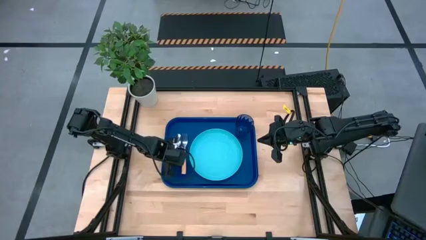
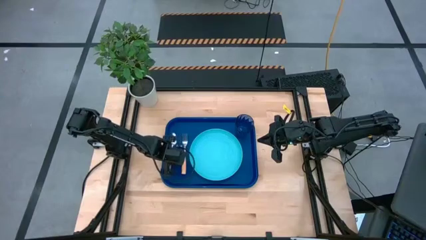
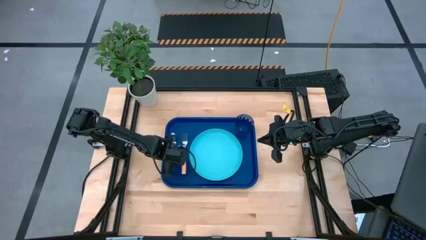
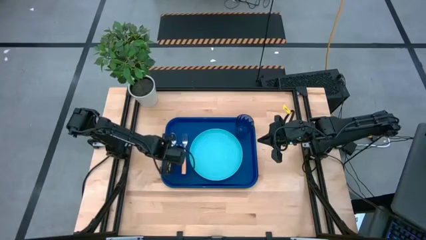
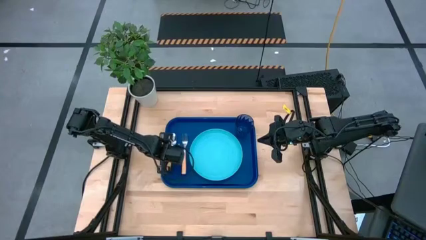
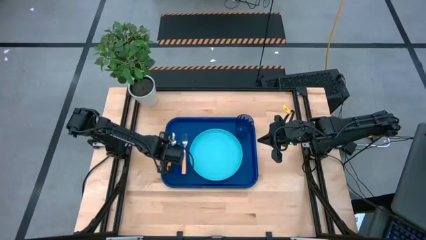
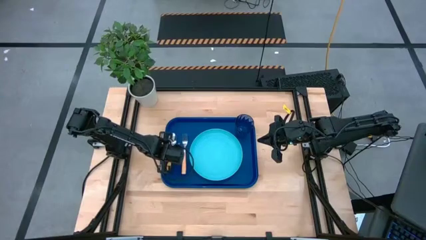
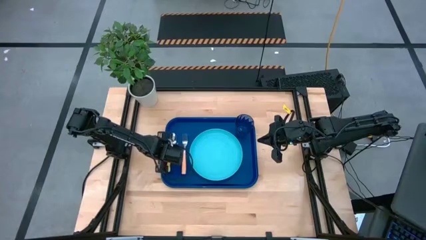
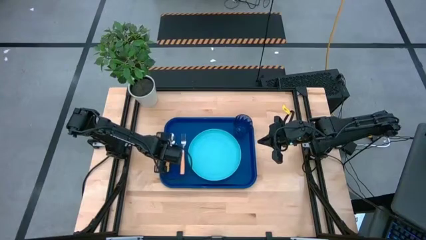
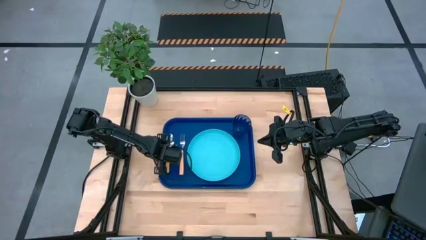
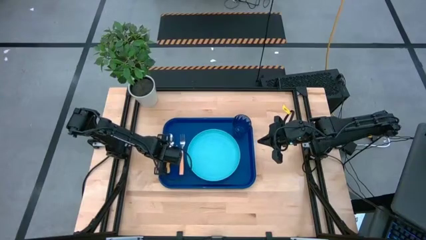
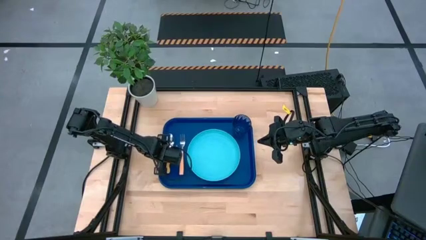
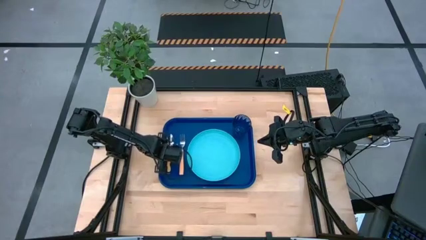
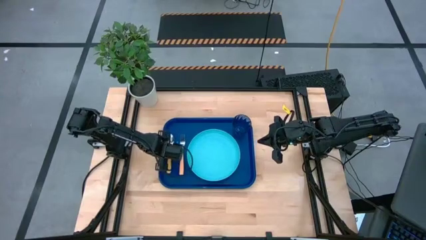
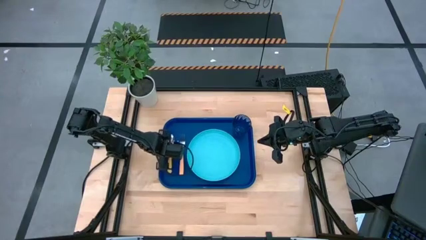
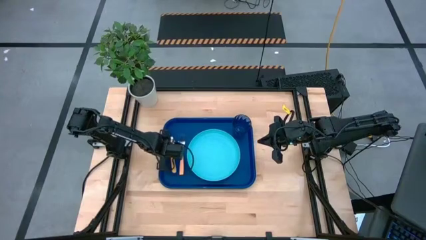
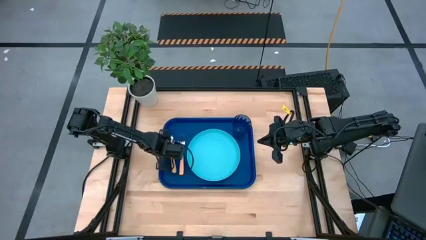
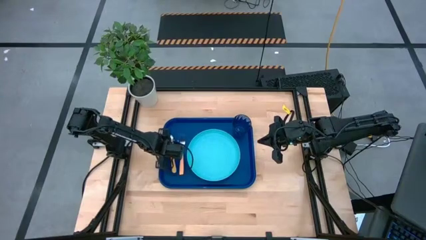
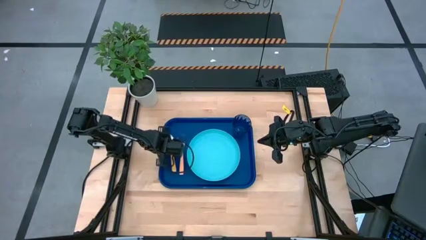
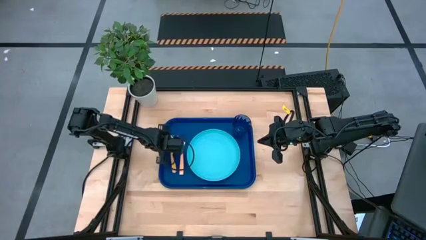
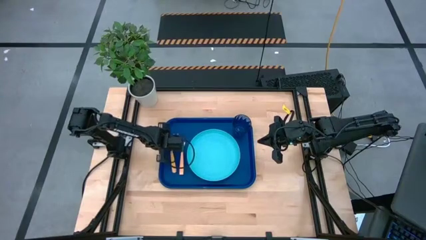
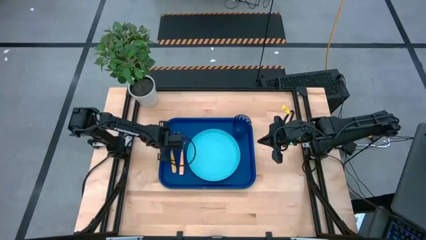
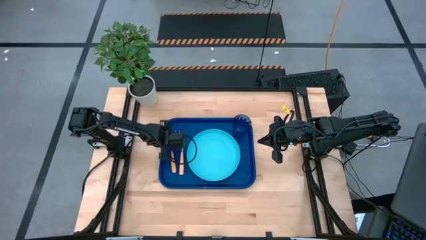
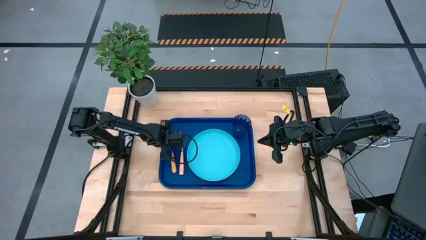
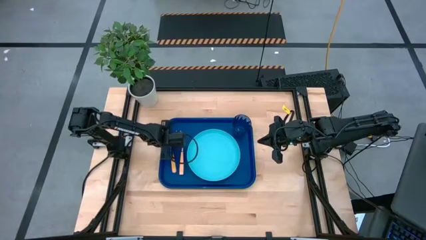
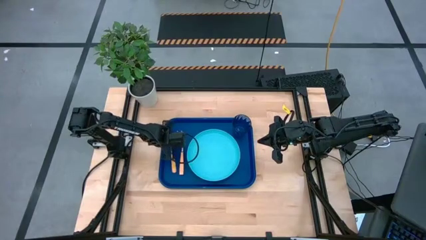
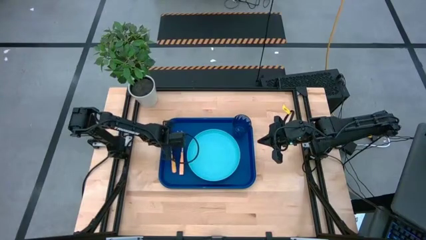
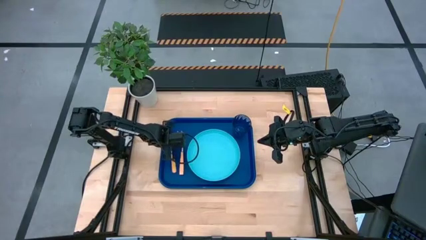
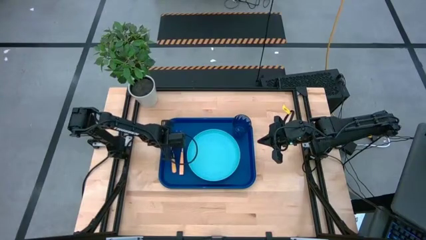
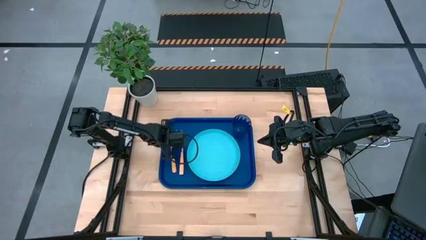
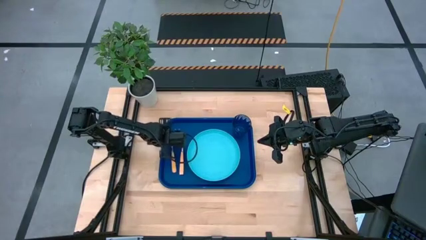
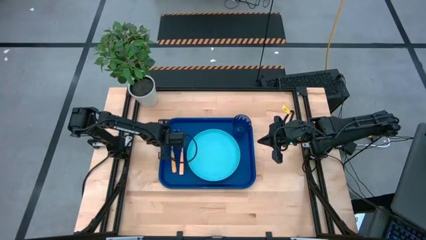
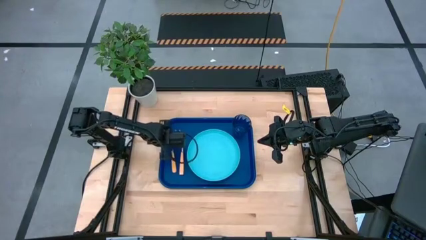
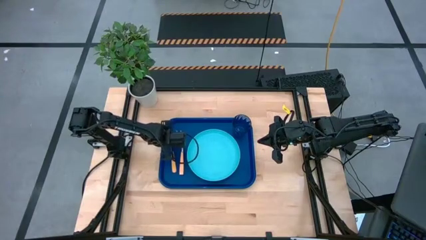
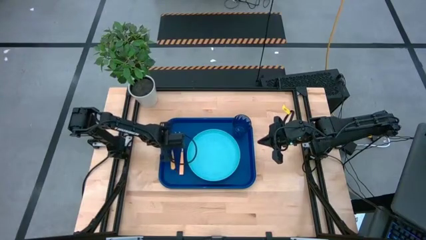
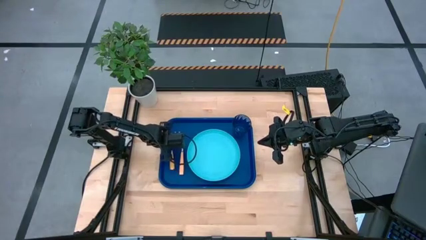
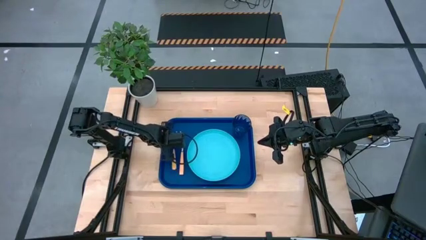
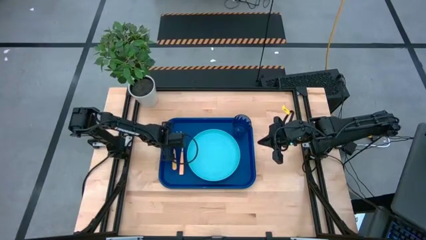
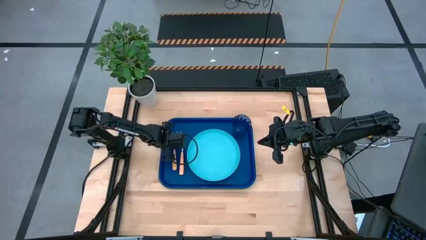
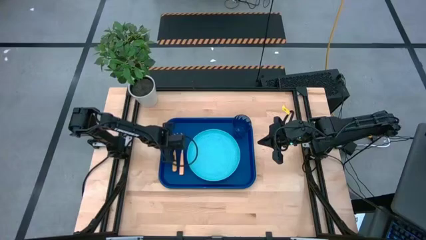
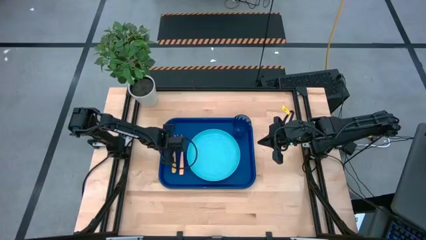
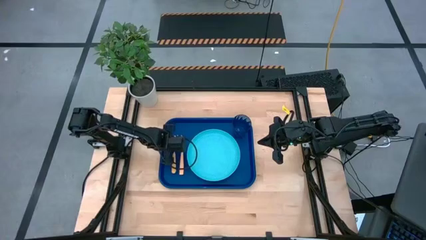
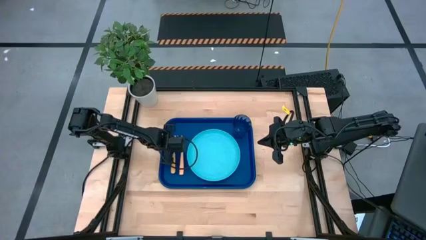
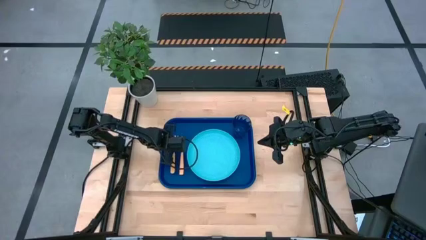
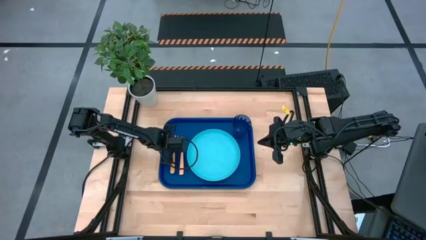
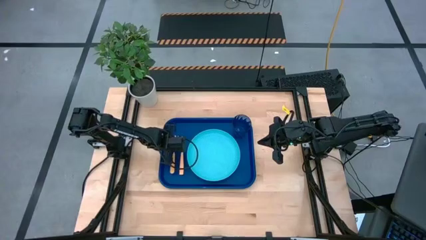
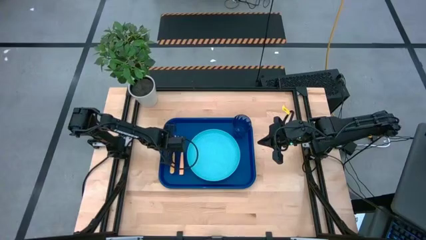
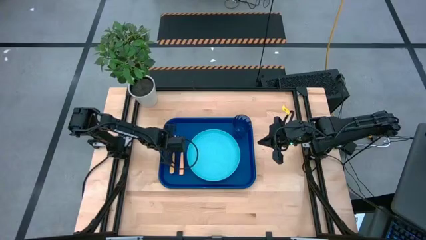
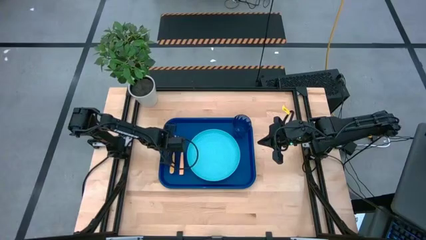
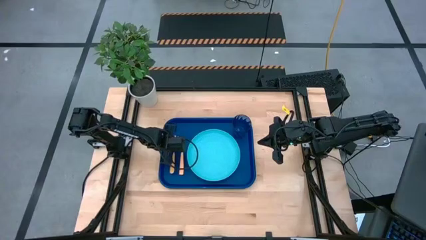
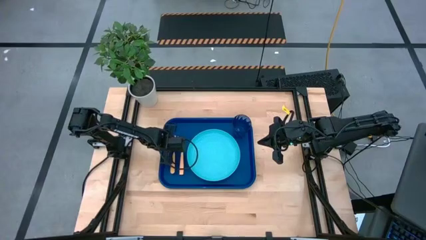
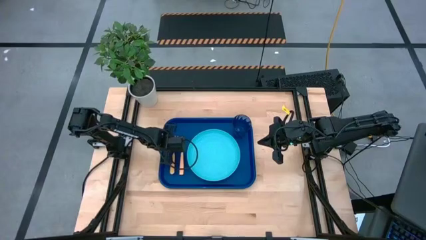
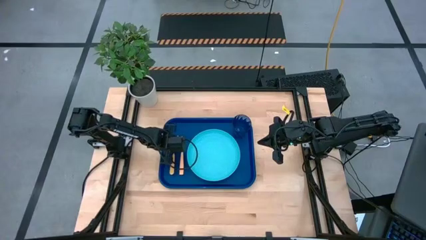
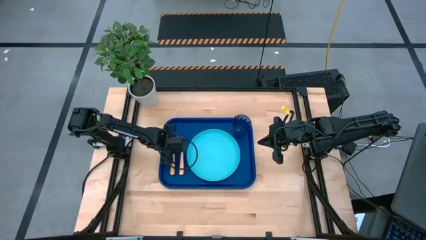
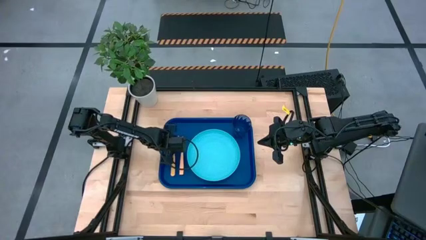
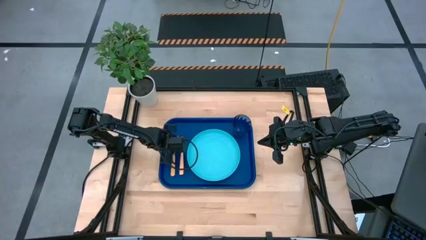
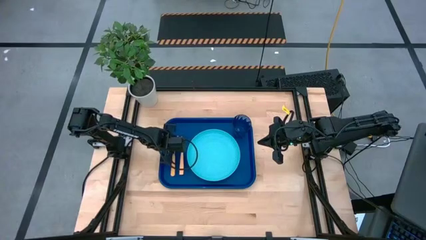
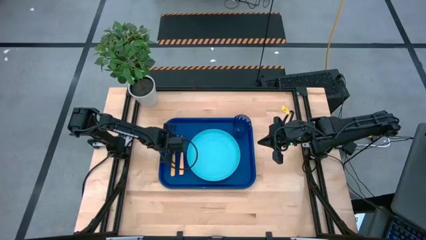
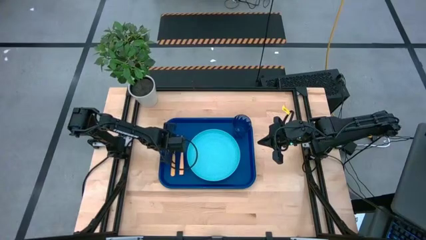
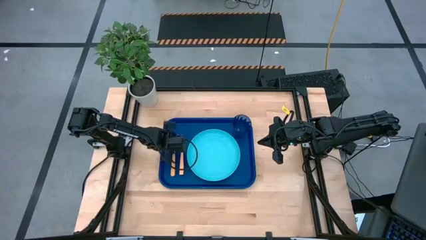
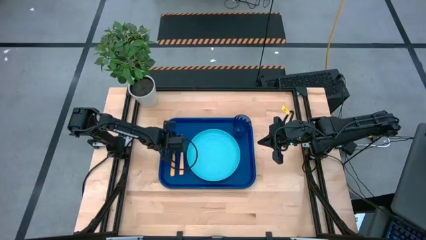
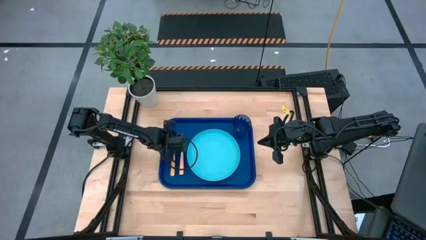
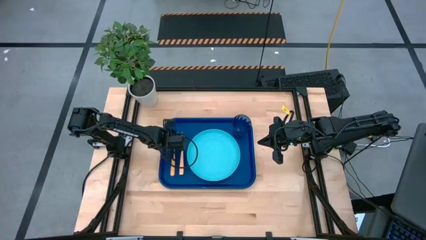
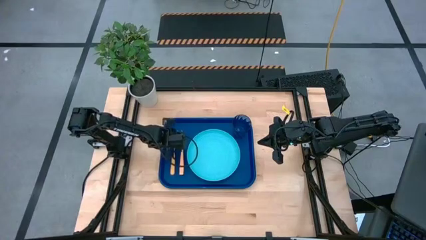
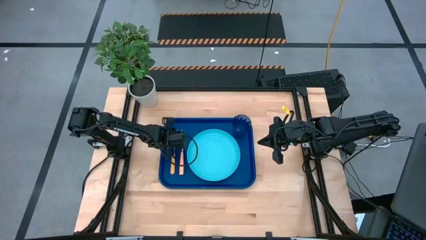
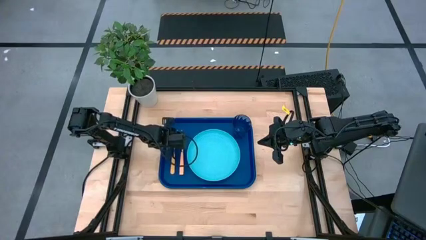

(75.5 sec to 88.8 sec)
Task: Pick and place plate/cup/fork/spoon on tray
Adjust the orange spoon on the blue serving tray

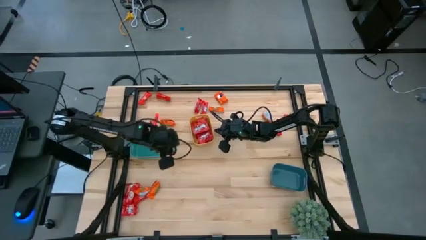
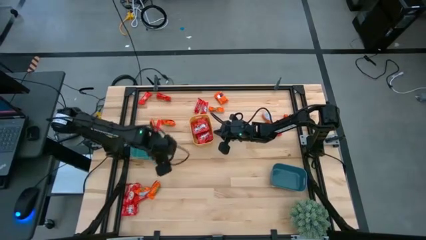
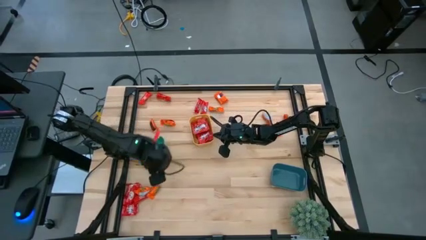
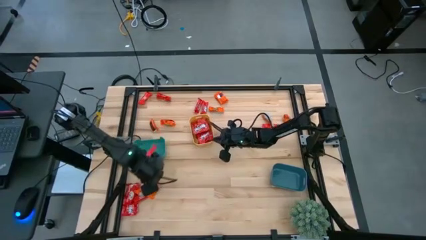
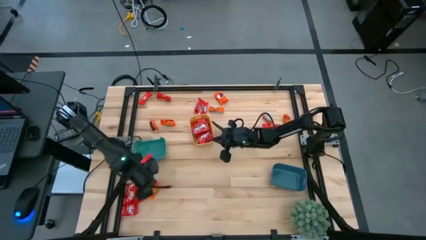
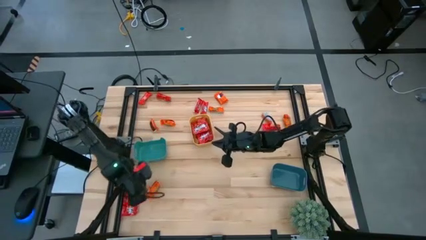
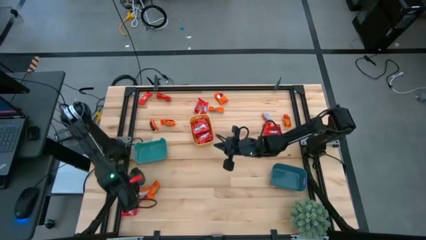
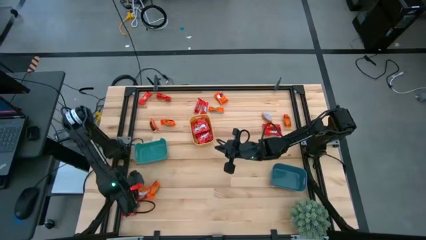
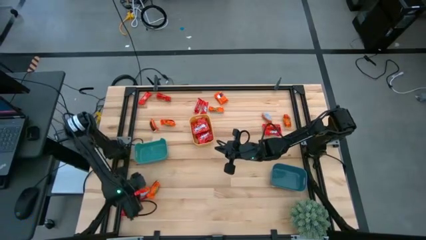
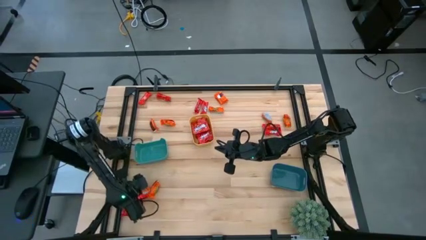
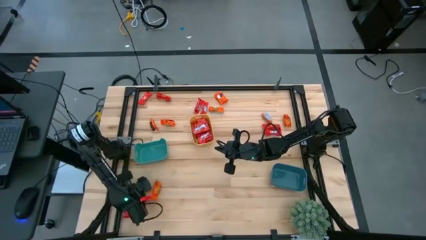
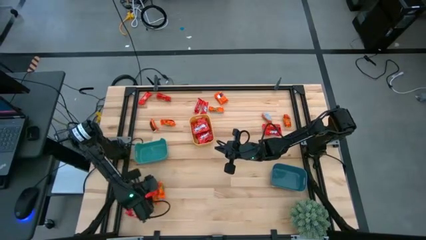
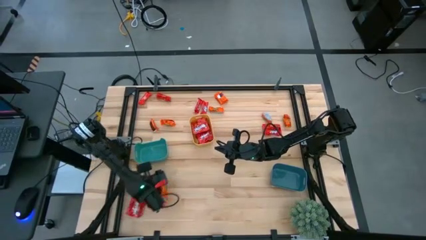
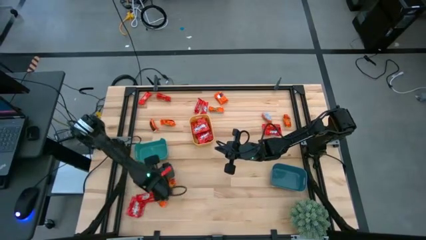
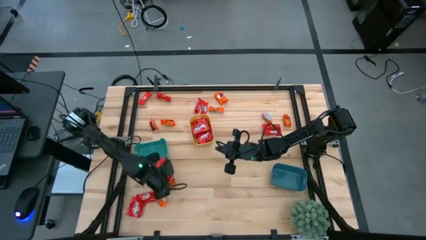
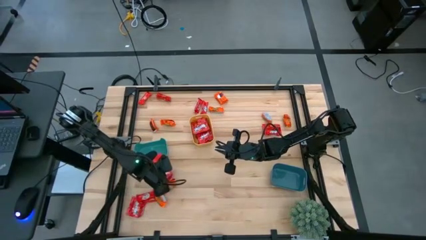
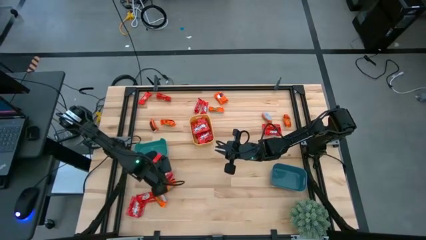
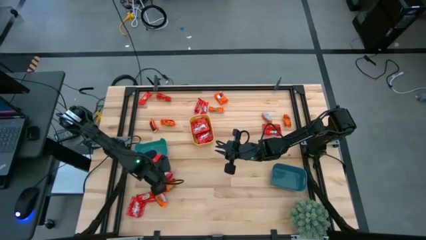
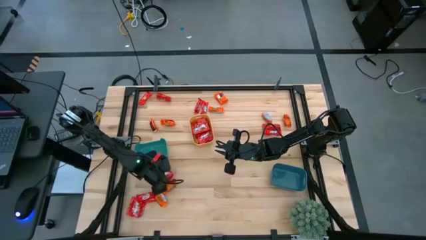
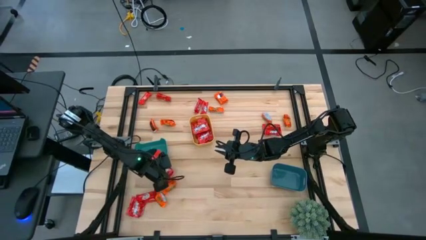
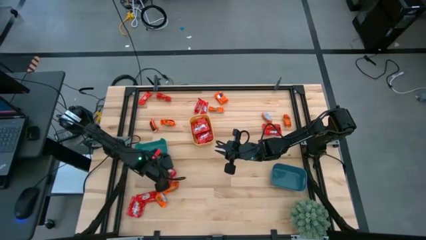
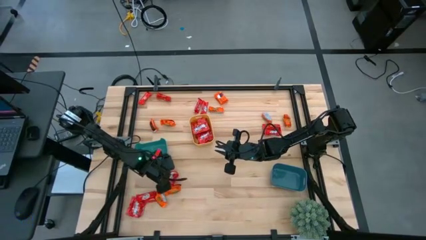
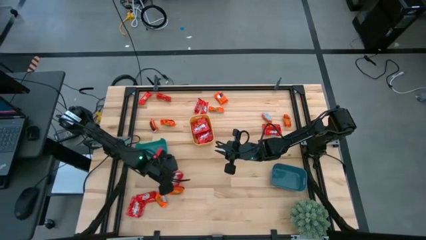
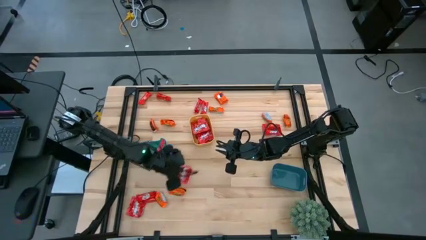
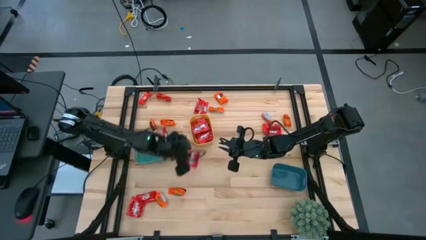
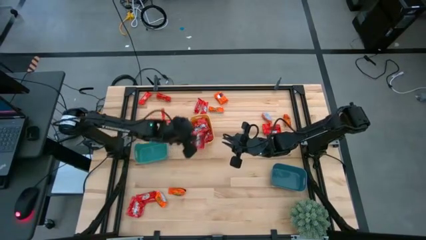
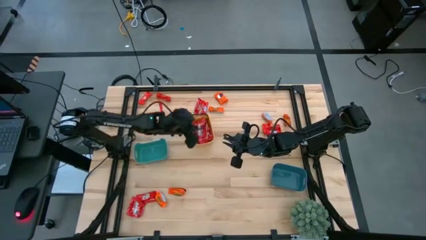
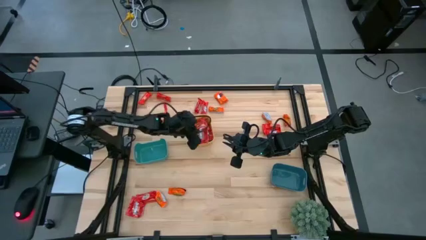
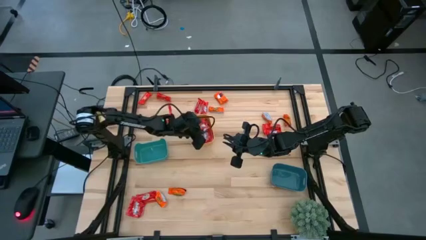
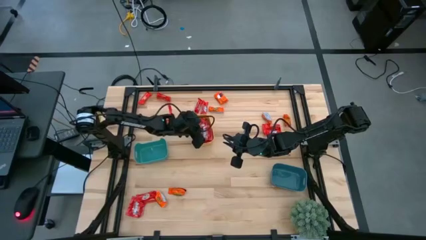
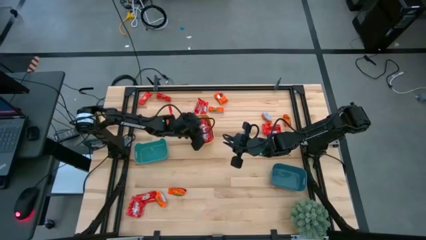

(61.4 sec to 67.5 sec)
Task: Sort candy
Put the red candy into the yellow bin
